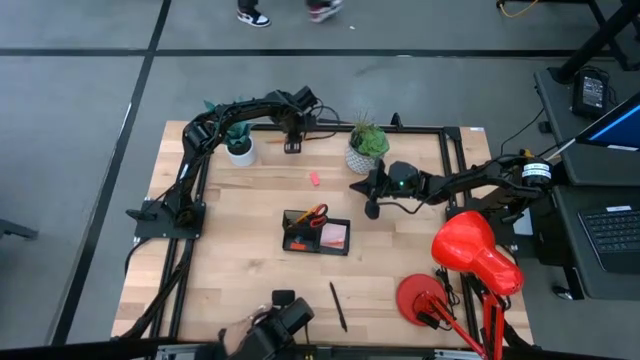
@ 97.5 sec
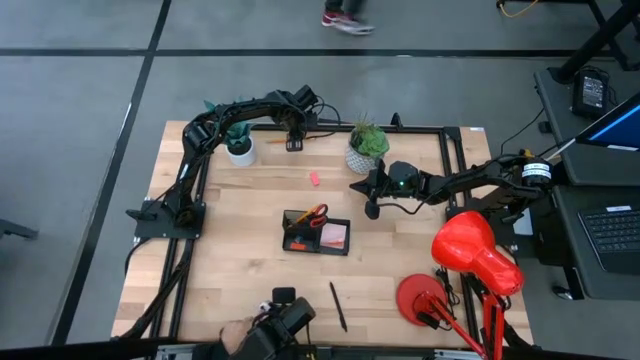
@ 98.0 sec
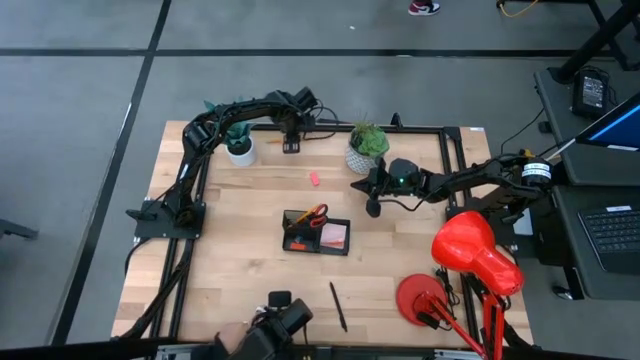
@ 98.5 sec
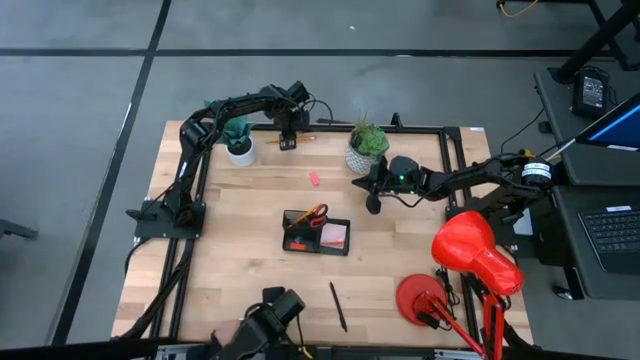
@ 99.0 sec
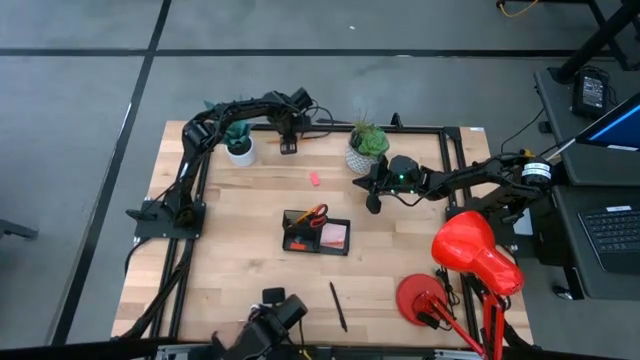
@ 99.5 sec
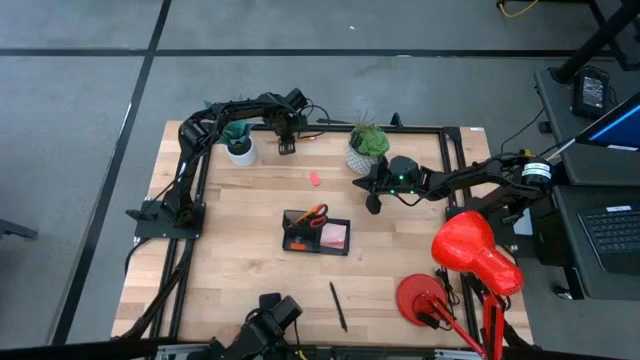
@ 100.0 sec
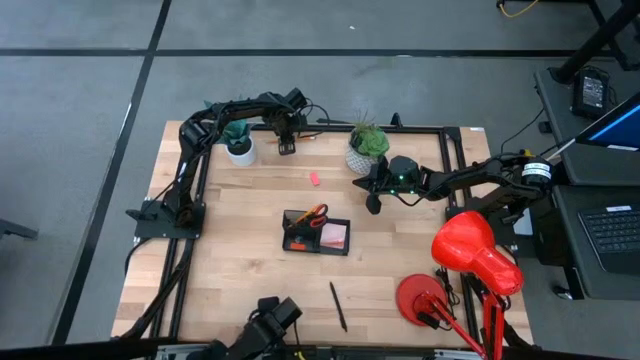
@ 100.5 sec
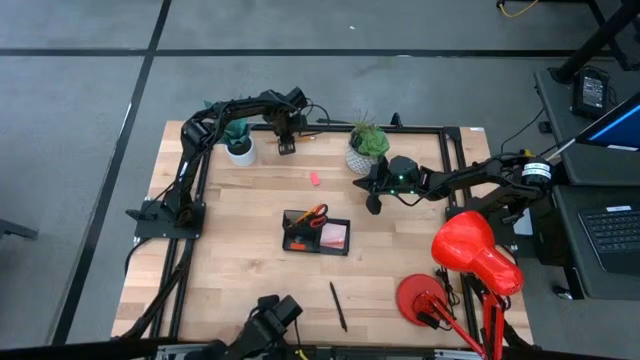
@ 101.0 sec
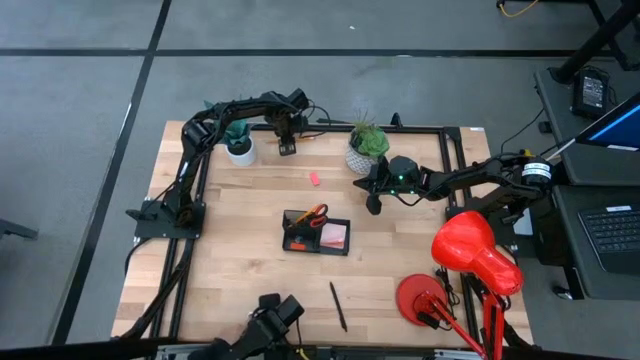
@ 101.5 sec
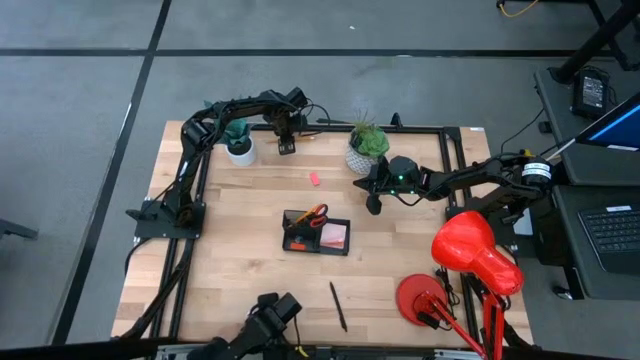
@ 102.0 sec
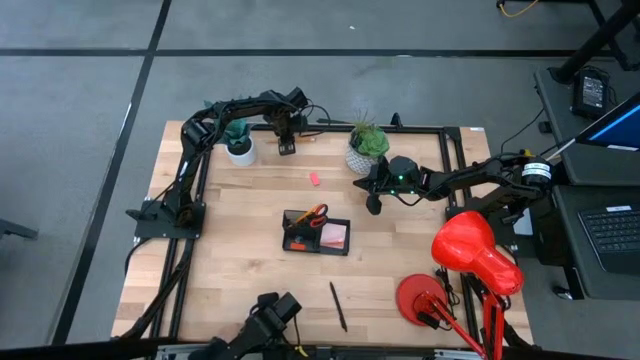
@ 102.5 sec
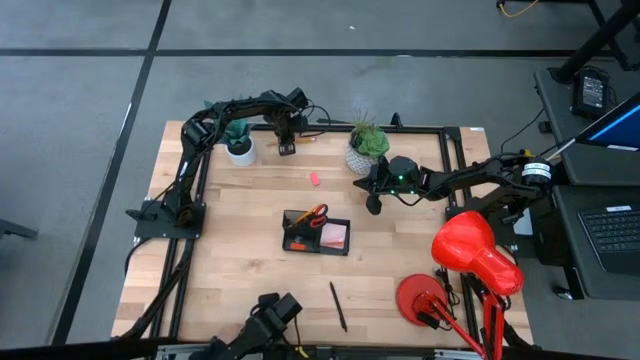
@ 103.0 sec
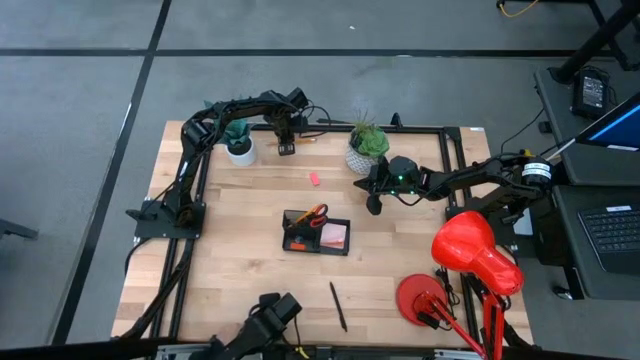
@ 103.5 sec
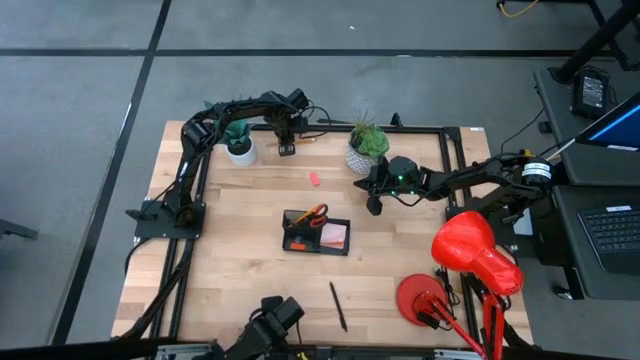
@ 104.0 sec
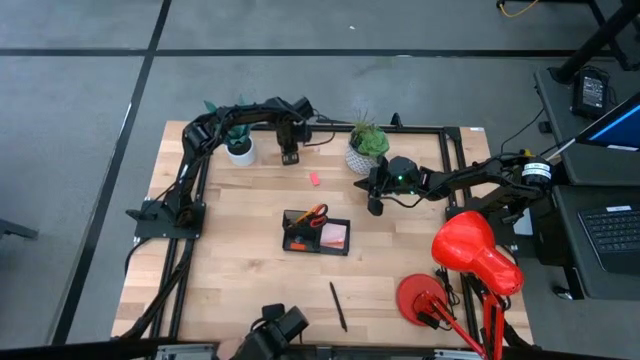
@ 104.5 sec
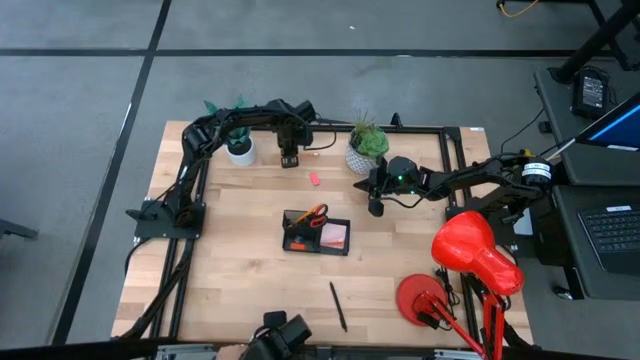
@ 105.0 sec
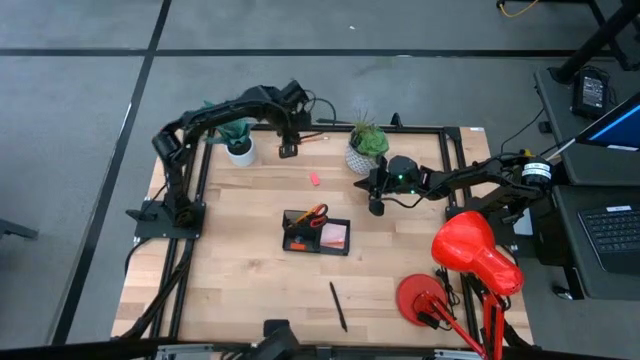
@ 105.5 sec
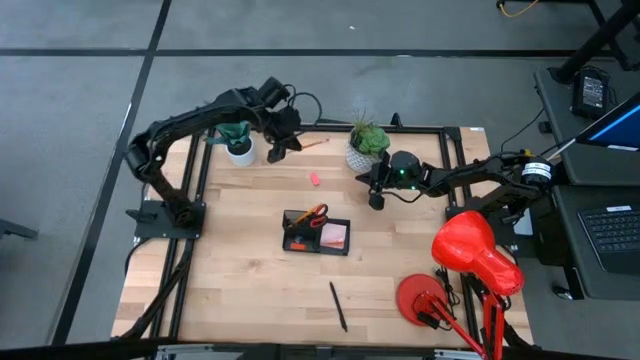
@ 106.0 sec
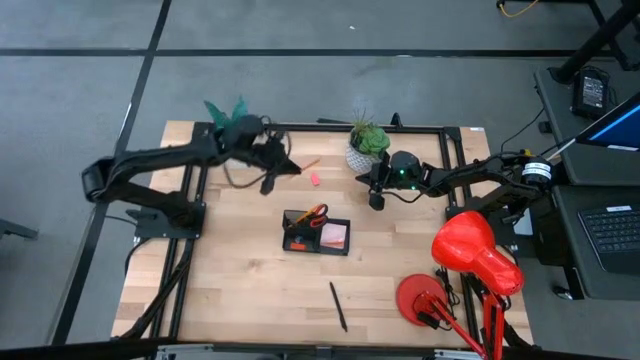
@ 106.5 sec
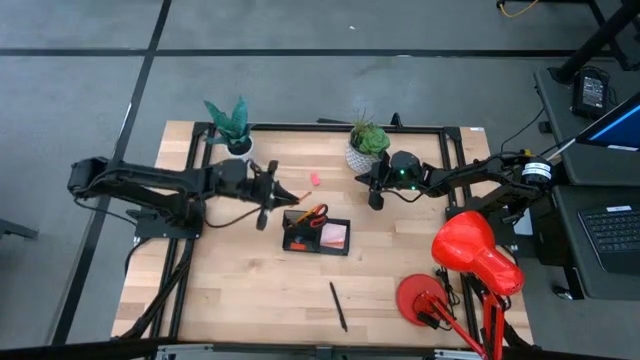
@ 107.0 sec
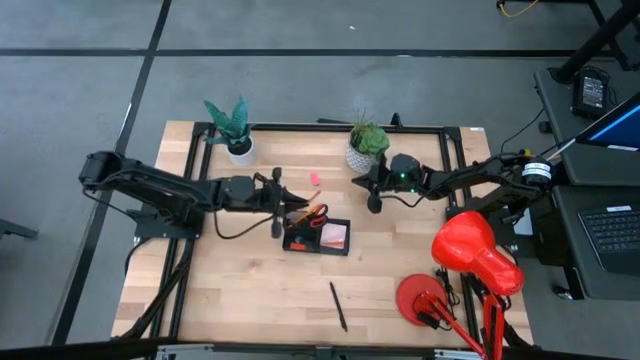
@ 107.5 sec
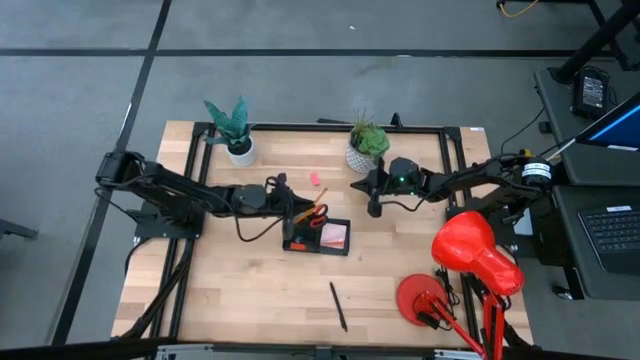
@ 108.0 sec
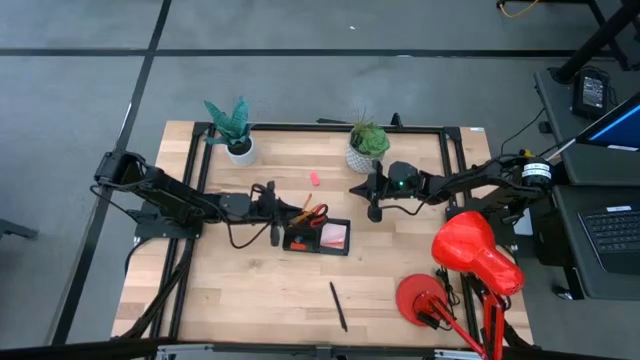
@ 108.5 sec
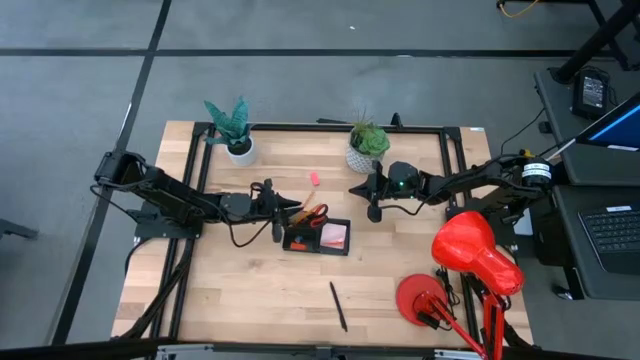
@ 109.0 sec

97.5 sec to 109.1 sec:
Task: Pick and place office supplies into organizer
Put the orange pencil into the desk organizer

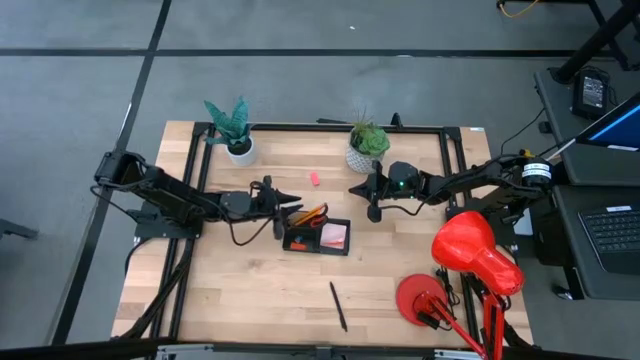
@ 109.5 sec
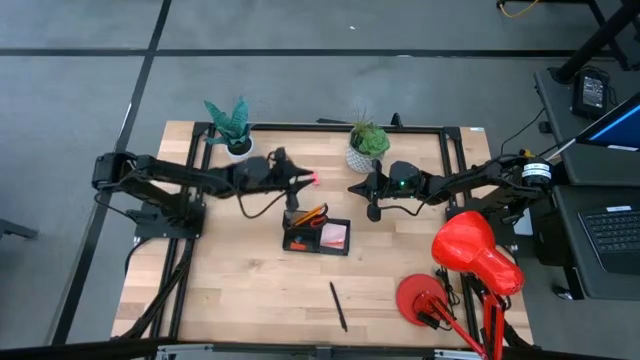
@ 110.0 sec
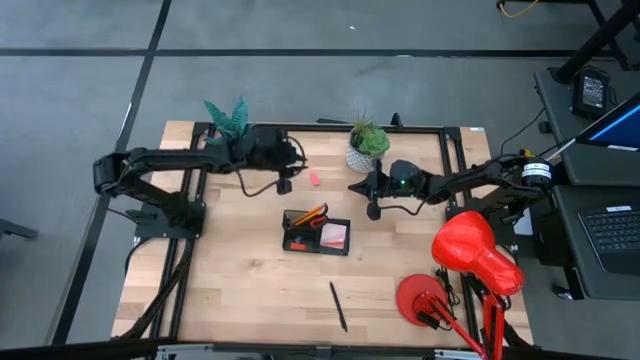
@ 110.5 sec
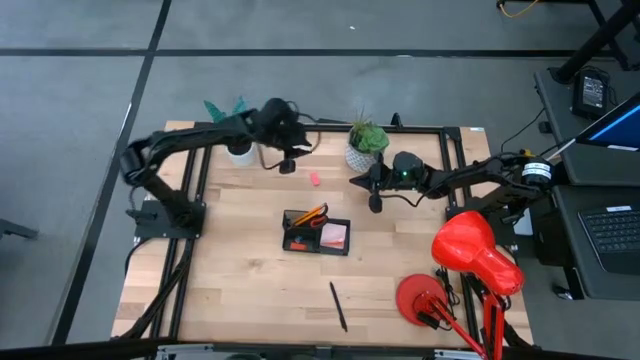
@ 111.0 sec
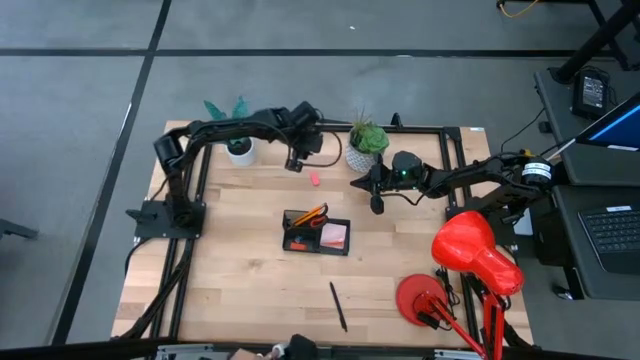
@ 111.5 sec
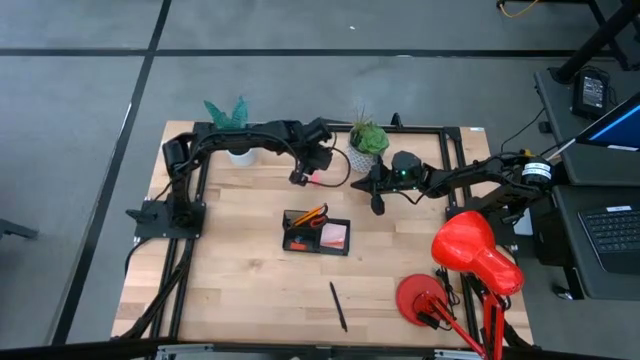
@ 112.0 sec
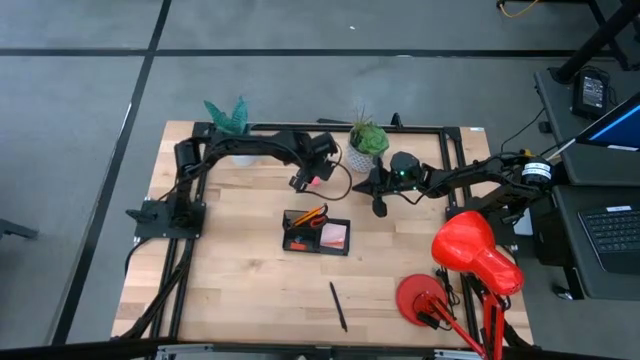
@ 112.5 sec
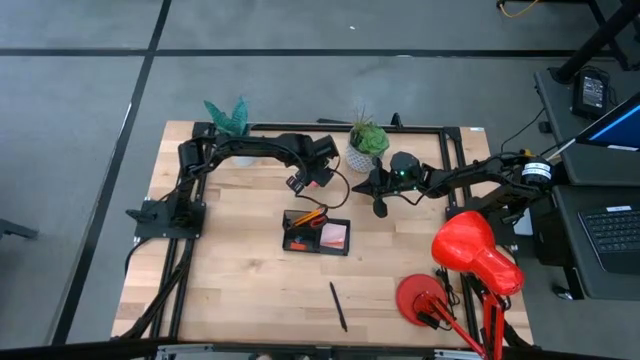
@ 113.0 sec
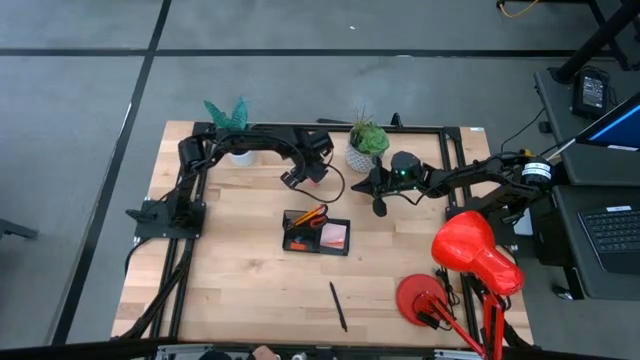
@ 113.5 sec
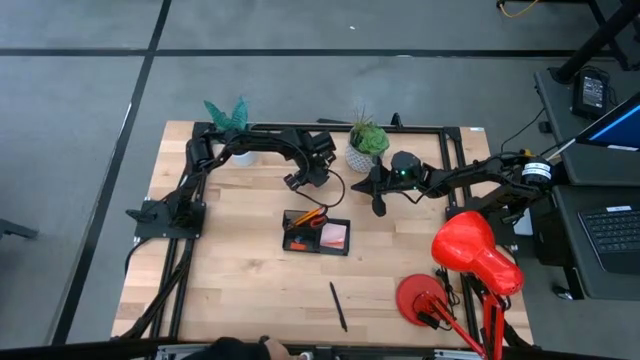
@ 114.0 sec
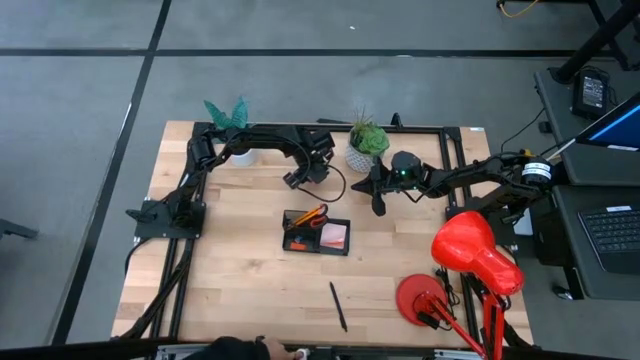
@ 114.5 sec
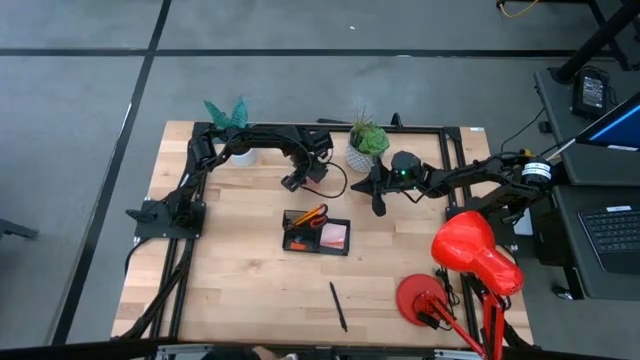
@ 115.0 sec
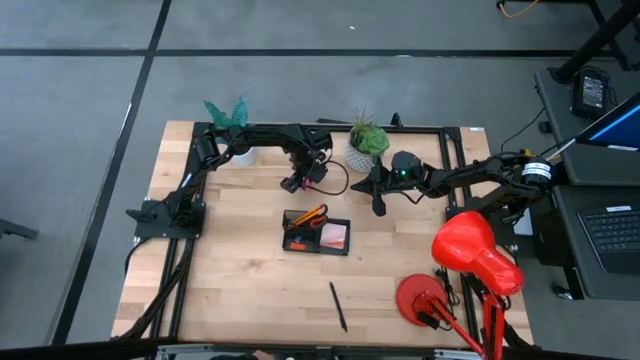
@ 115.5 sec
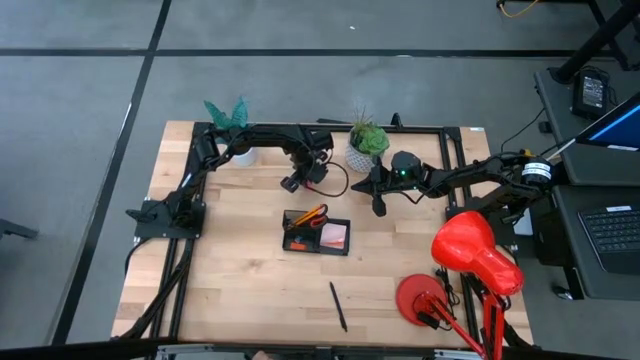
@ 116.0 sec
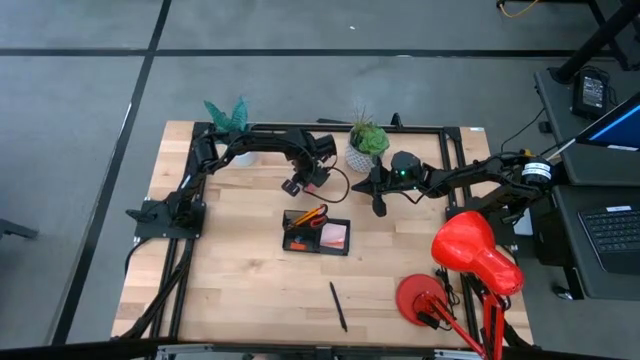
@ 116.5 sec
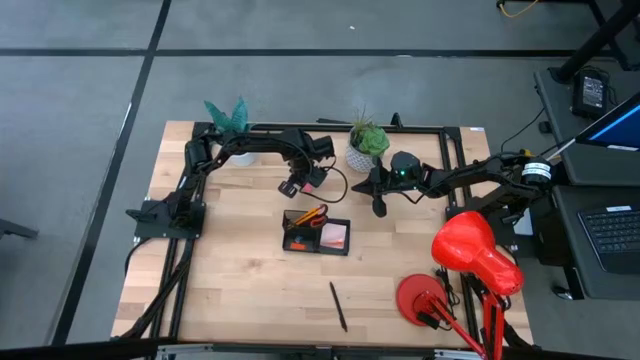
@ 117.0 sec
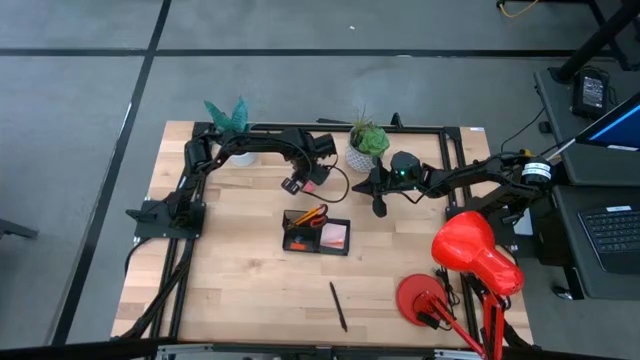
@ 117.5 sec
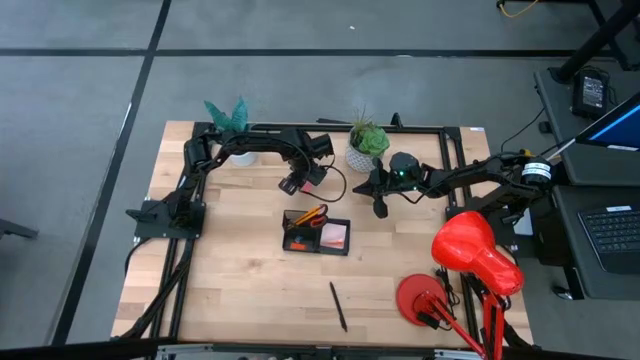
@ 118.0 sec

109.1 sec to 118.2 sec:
Put the pink eraser into the desk organizer
